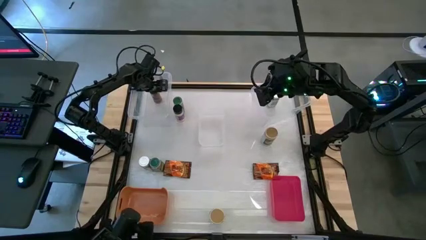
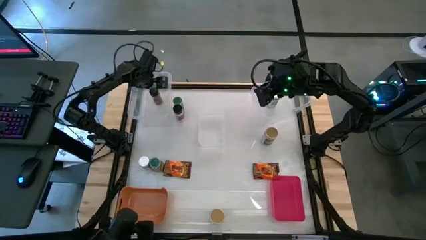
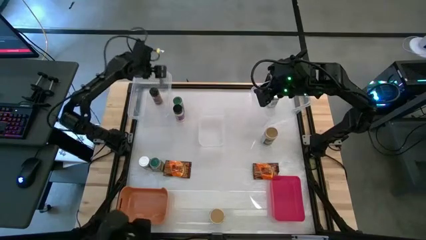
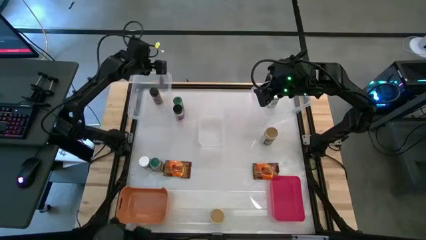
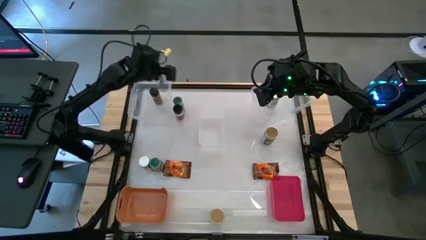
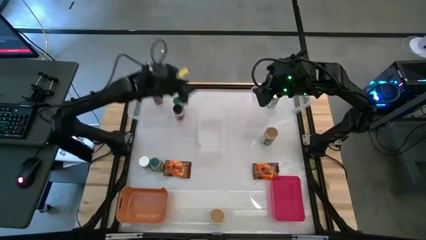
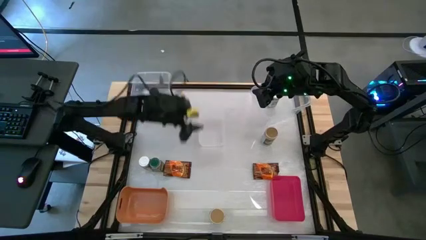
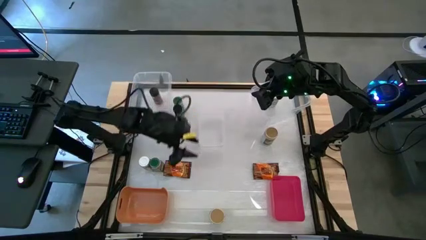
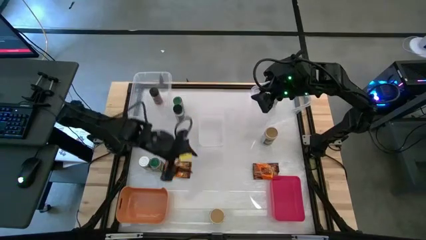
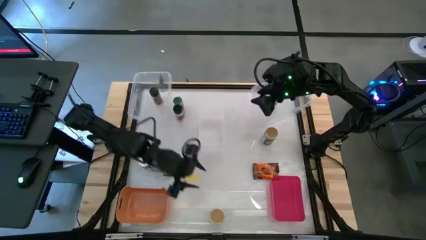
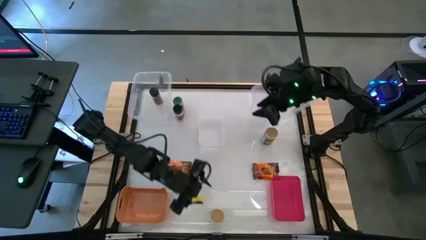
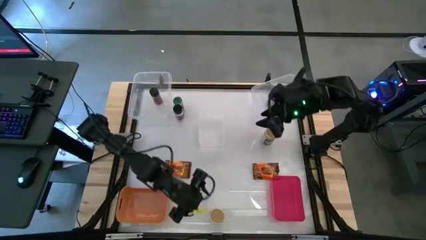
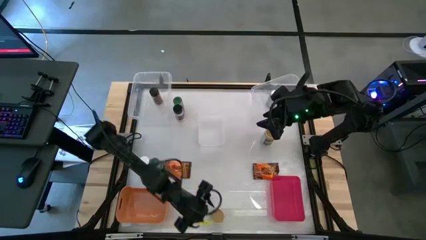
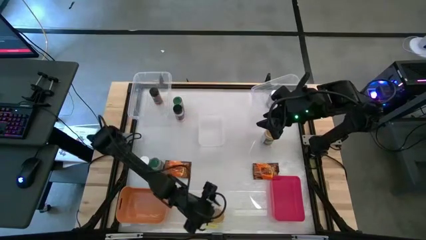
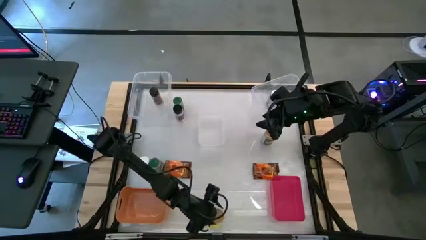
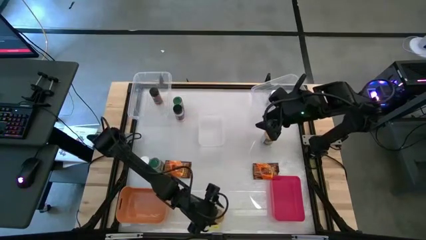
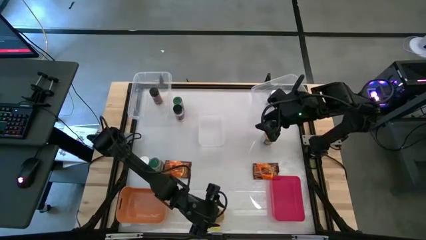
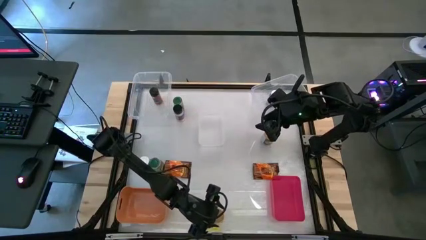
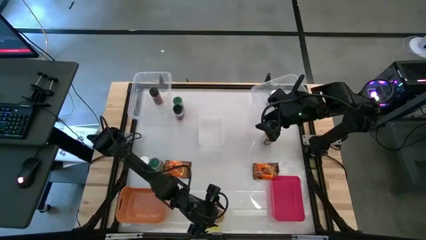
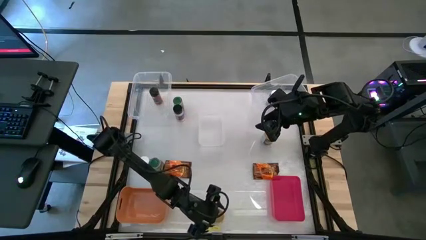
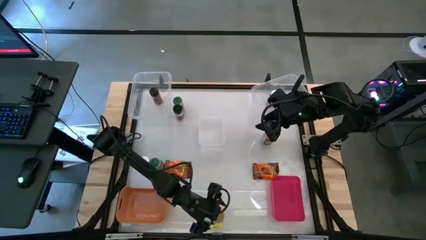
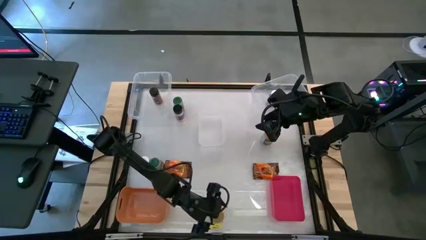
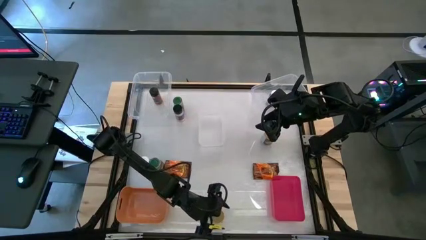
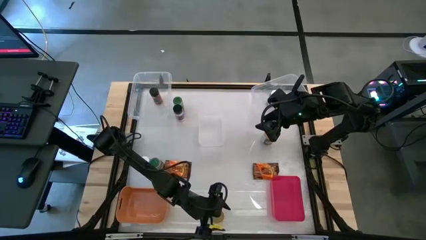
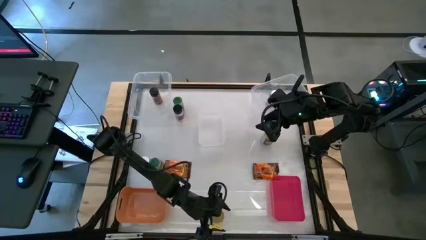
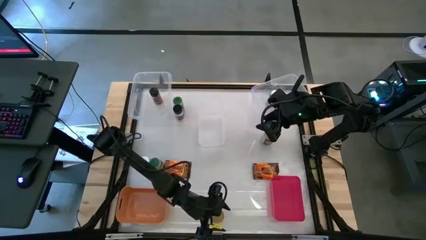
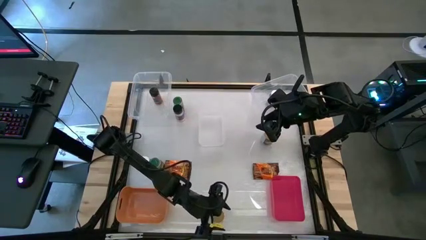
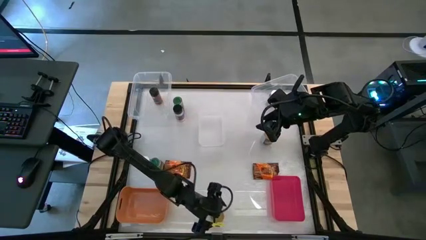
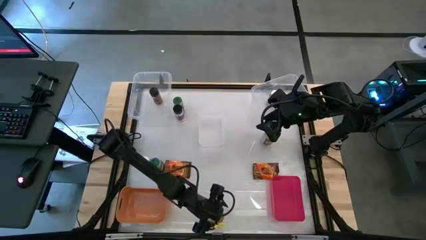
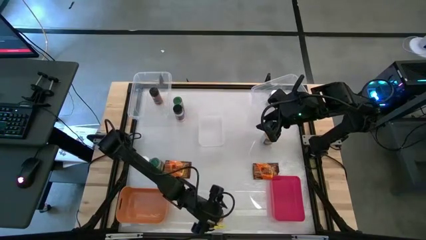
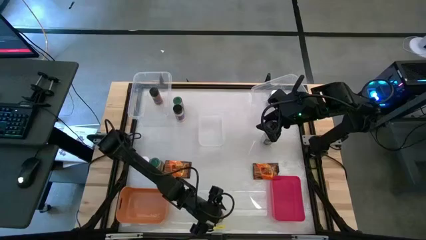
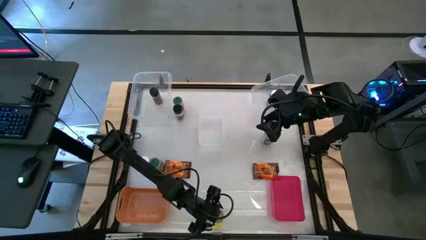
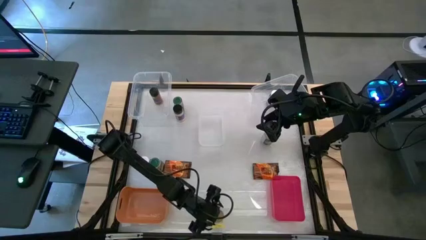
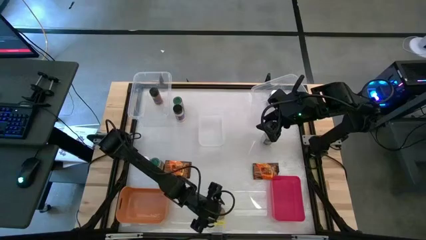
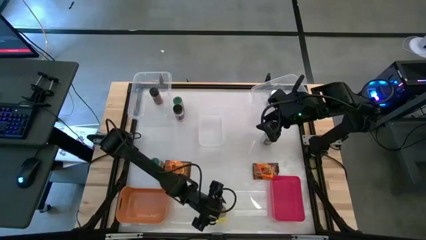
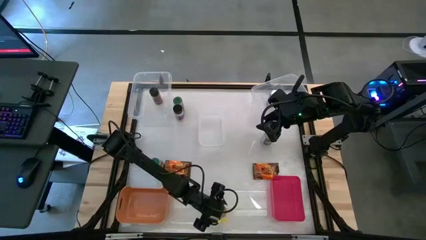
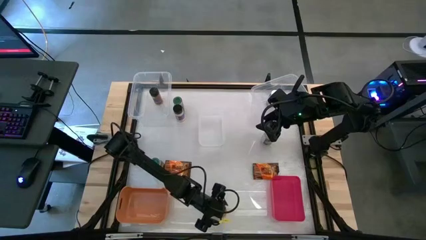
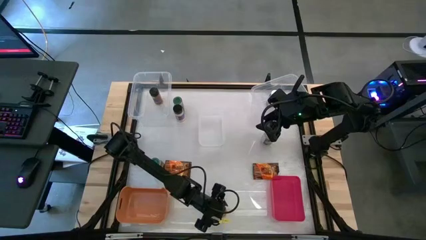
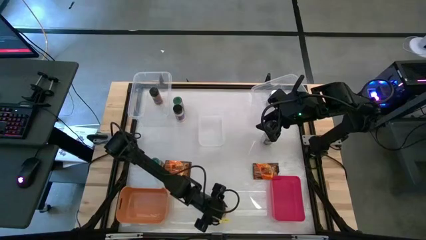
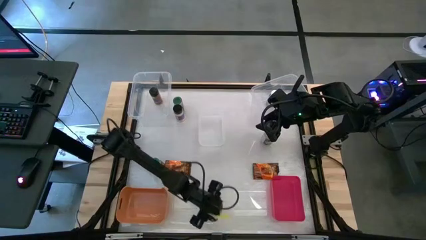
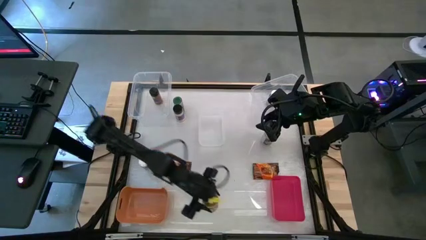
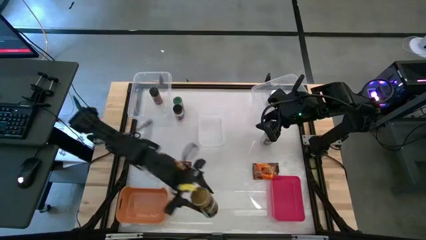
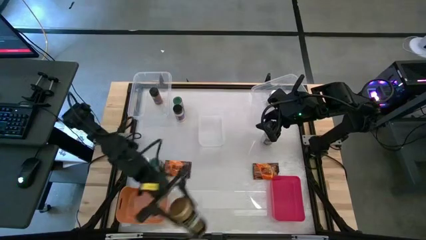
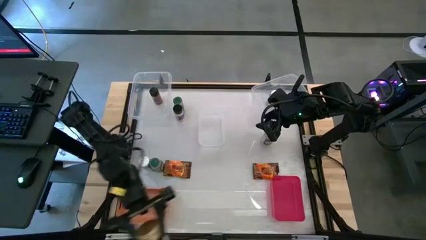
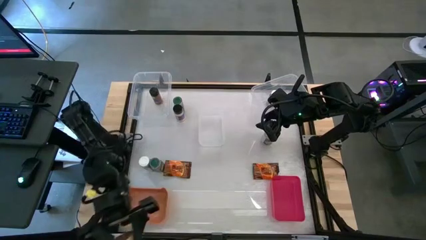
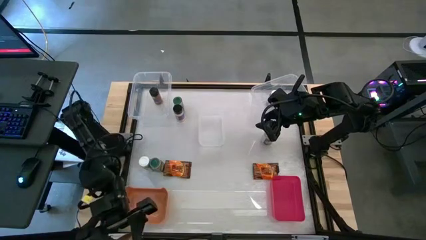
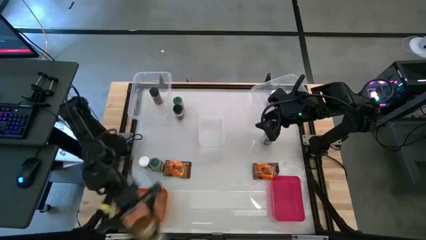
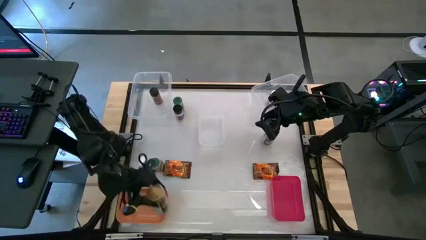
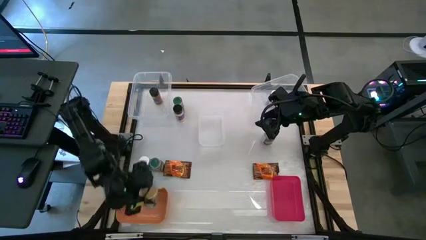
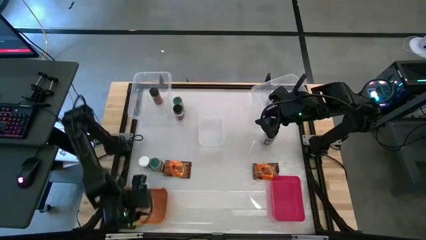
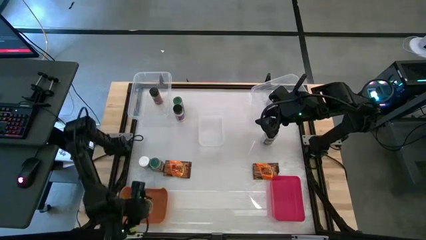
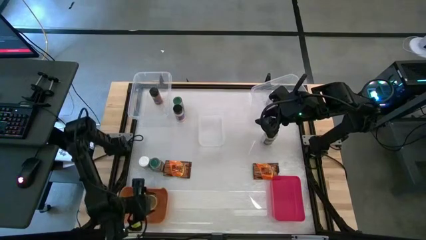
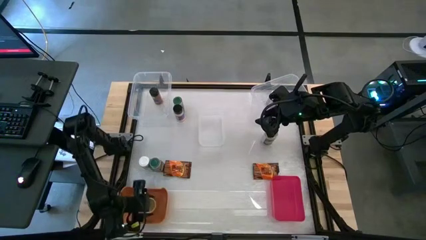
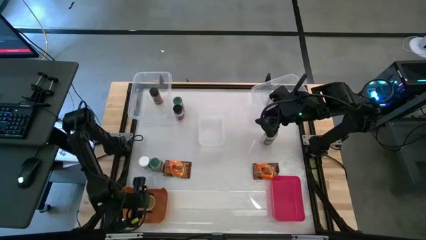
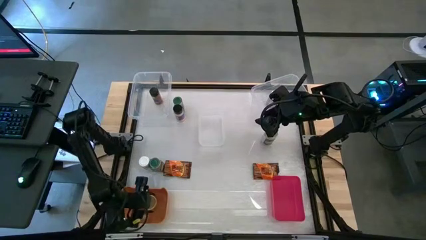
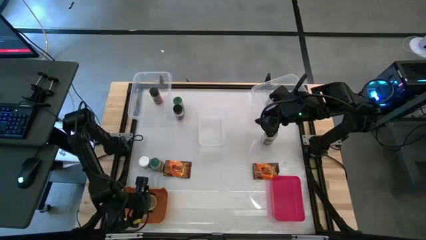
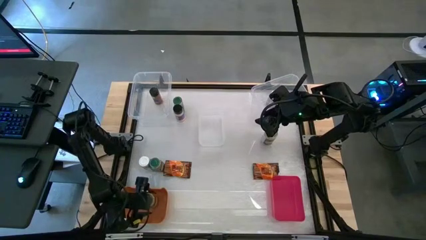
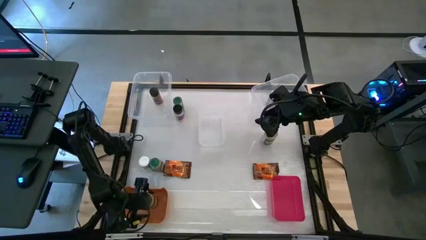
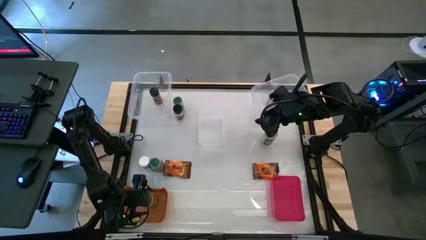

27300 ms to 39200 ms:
Task: Sort spices by type
Put the bottom gold seasoning bottle into the orange bin
